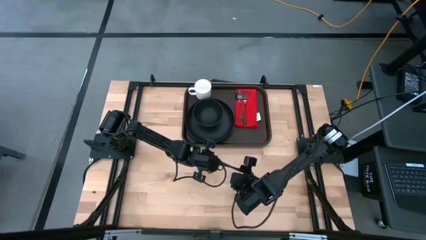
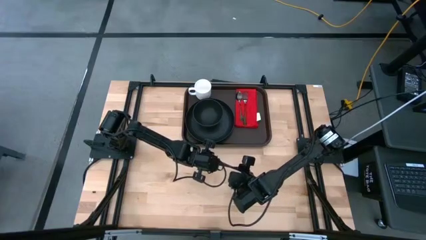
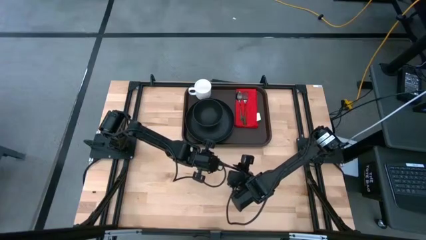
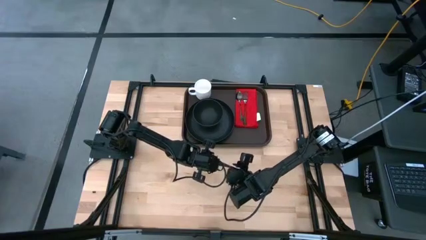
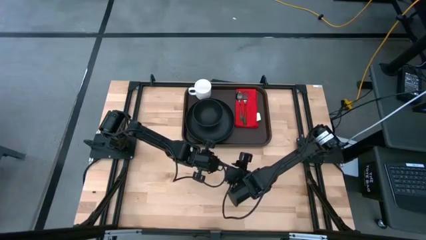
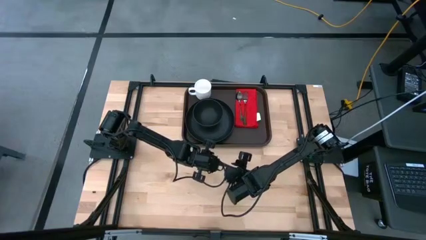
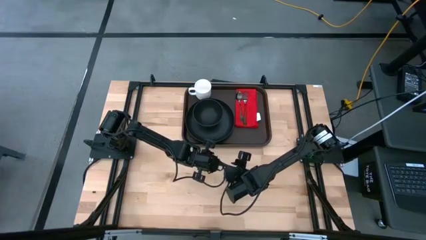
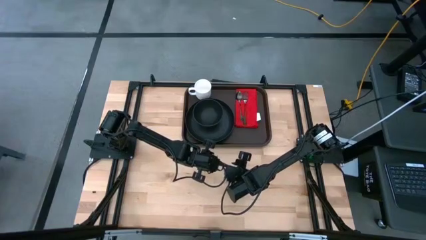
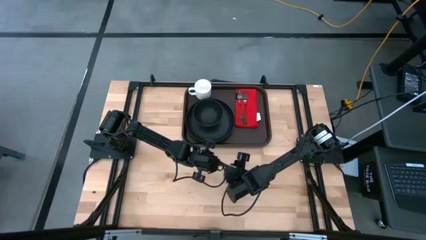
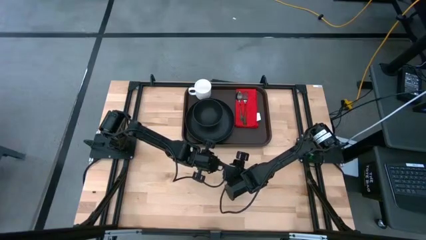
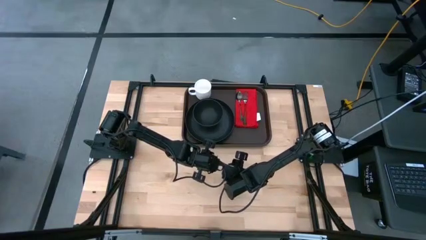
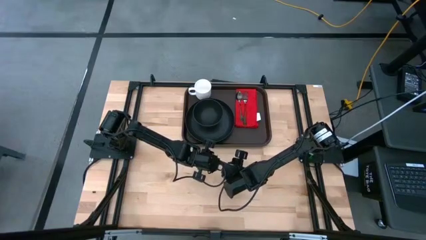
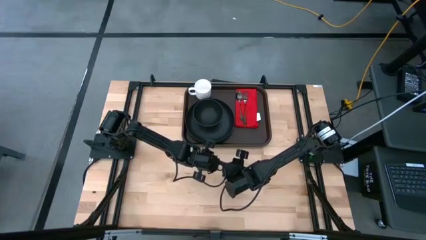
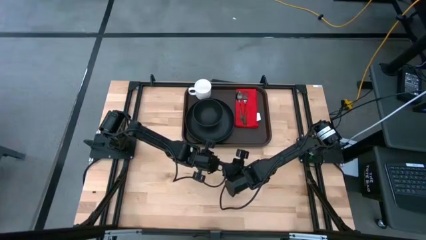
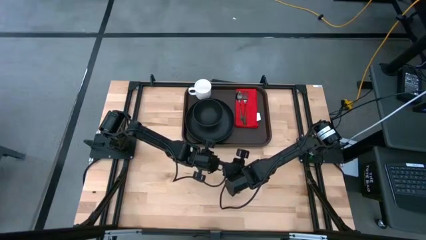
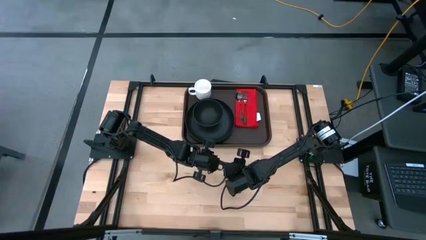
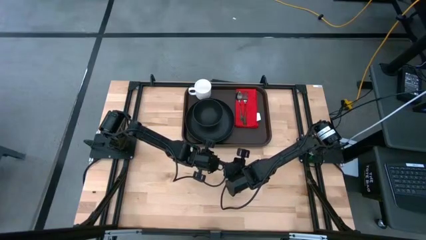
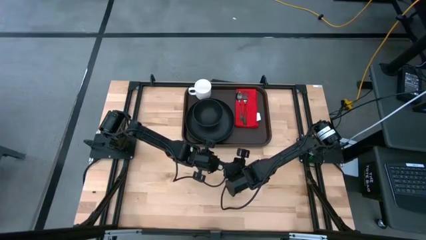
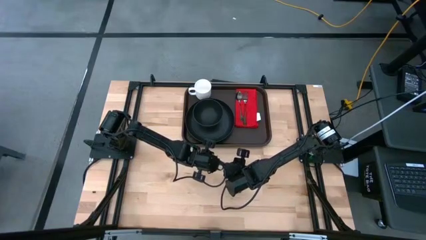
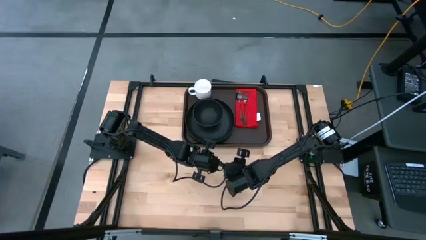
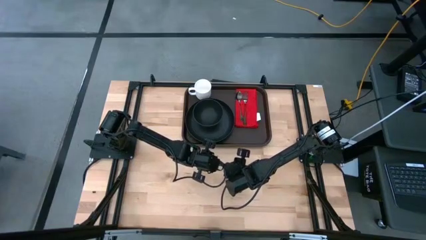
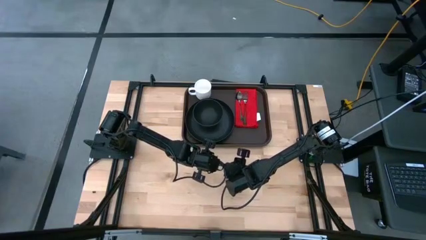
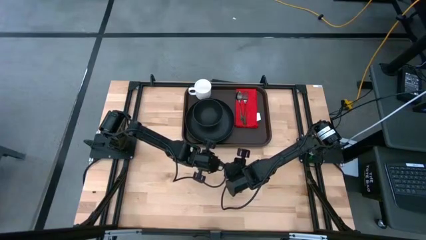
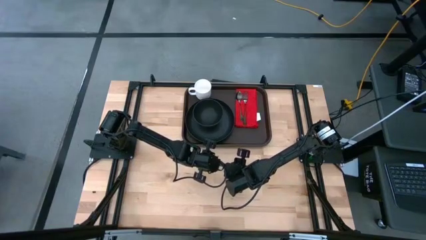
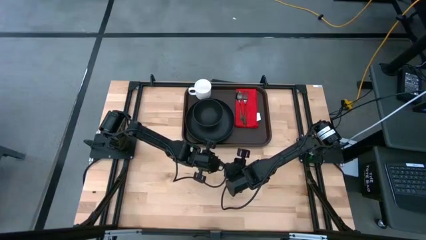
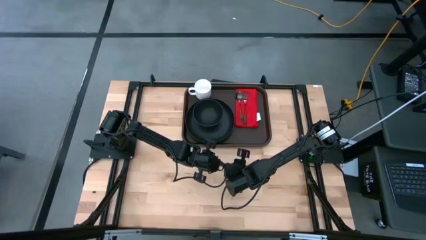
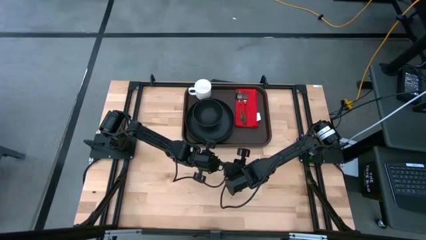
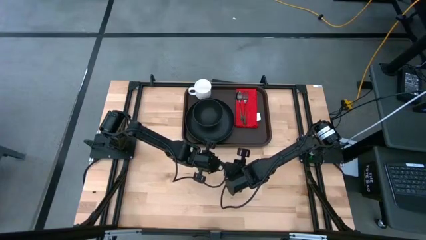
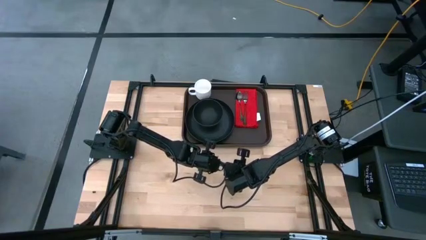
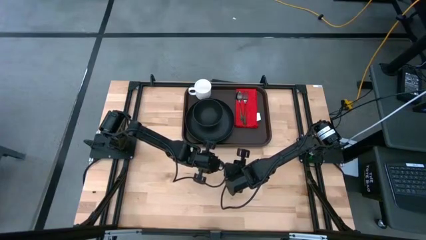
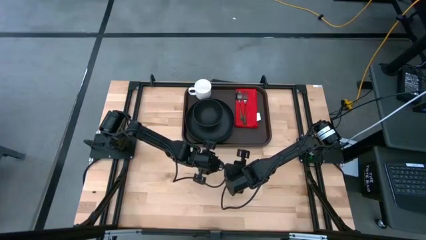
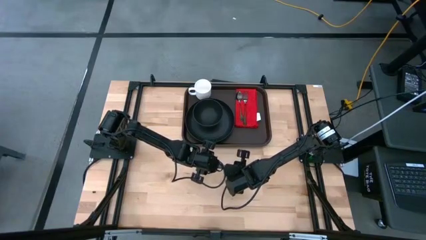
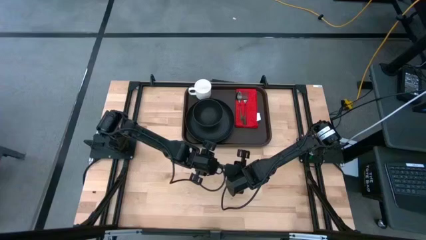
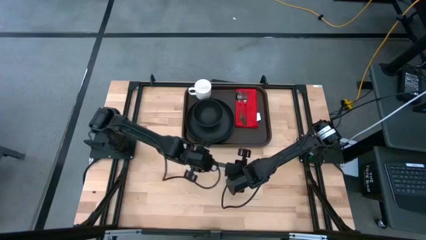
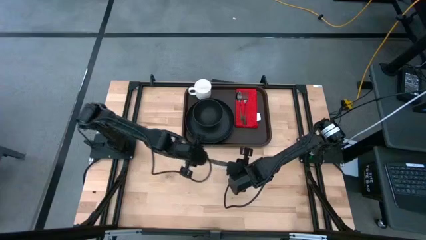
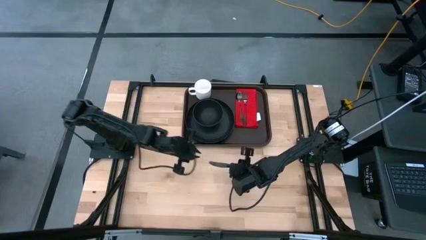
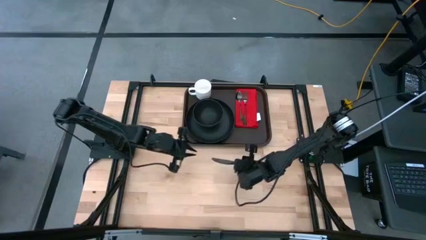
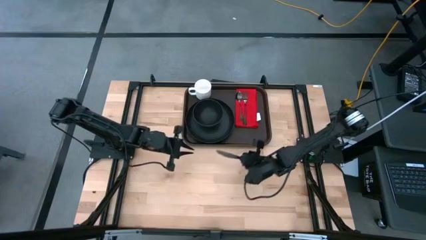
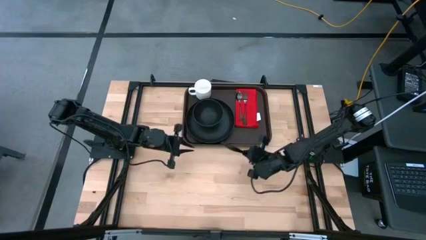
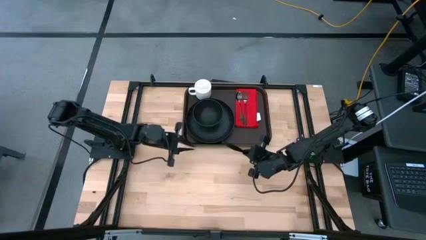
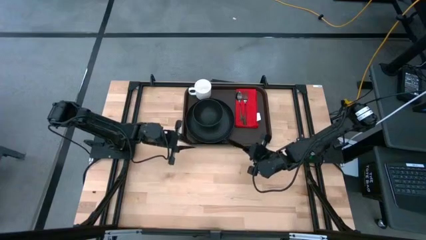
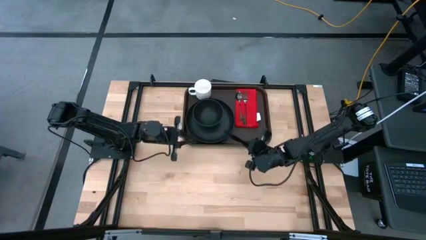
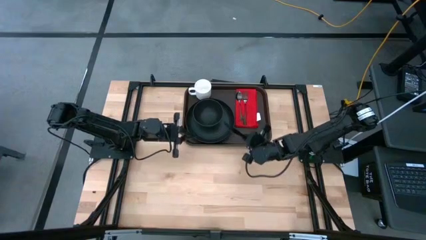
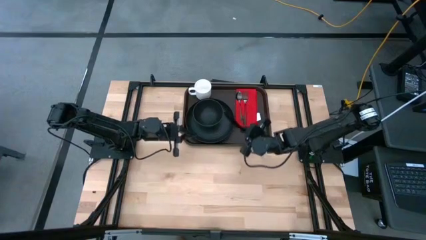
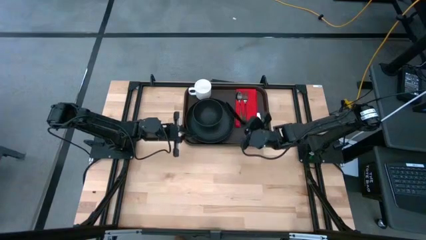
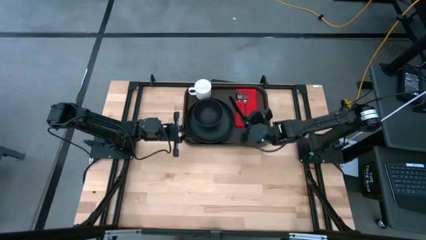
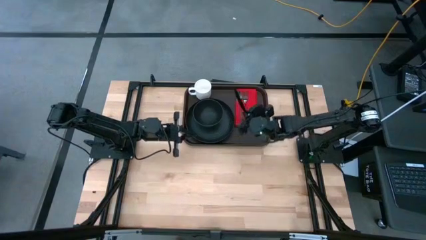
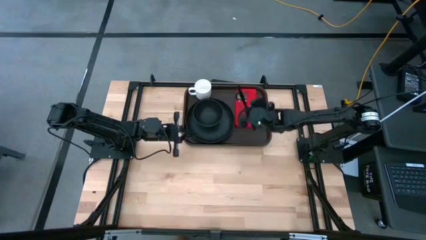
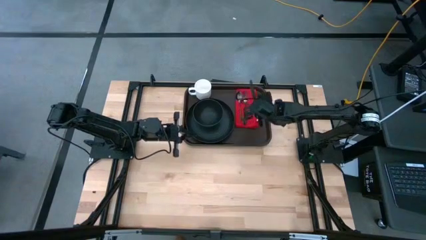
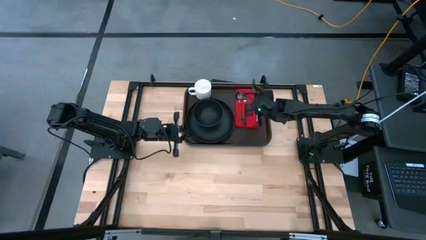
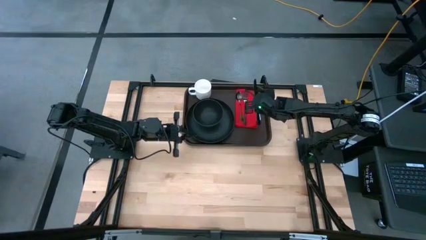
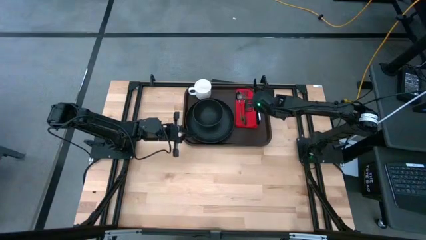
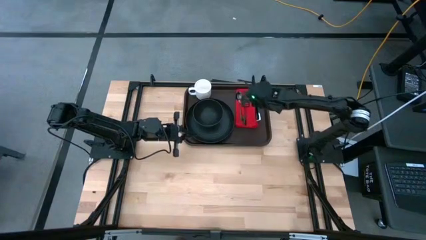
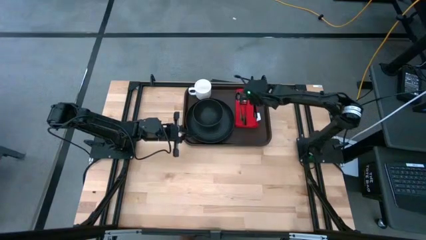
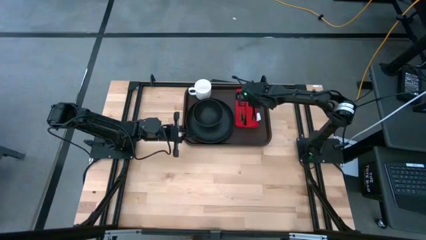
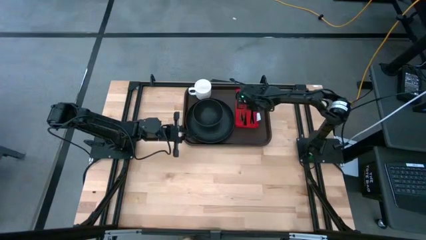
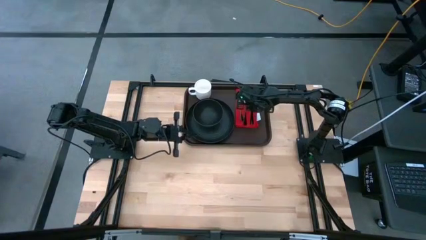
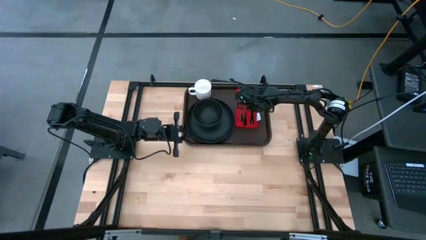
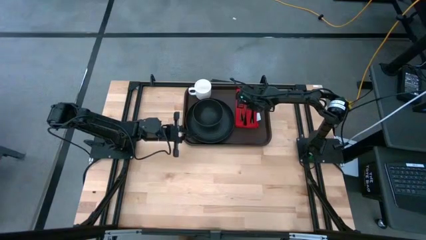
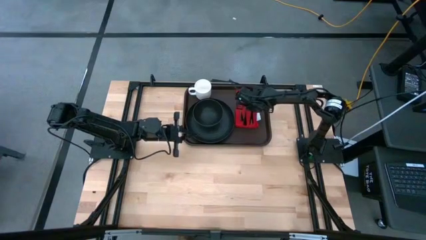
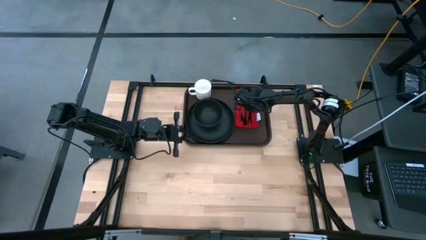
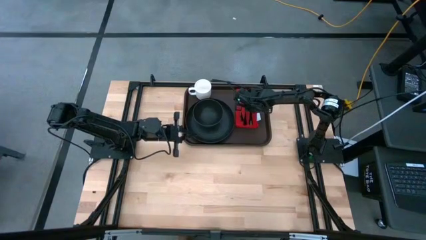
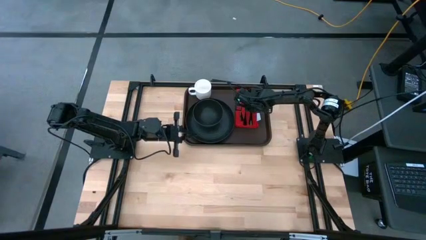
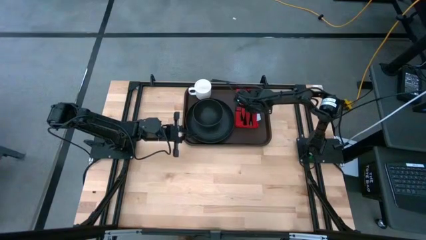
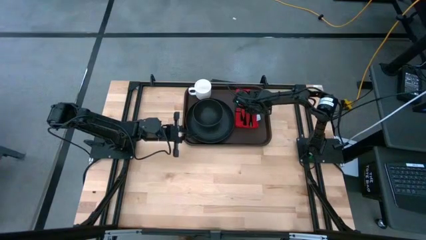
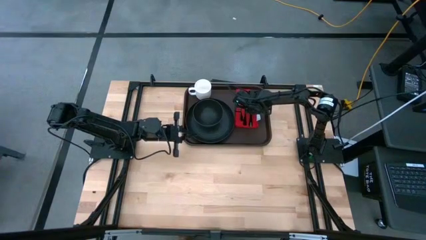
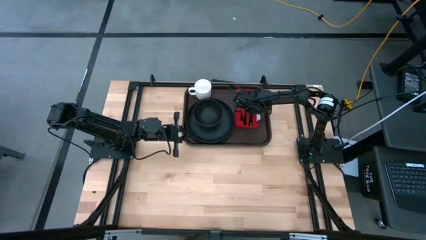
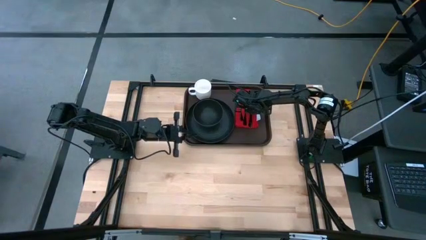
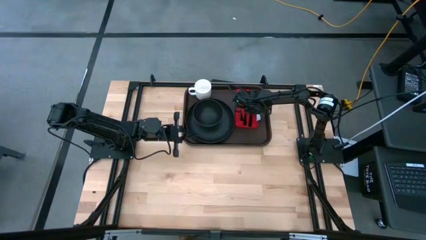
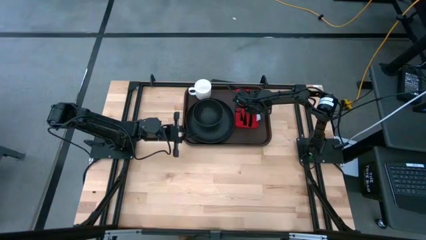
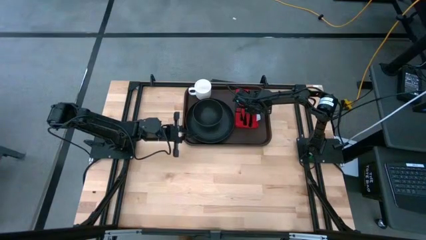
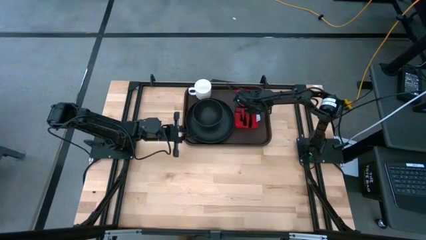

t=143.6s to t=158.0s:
Task: Set up tray
Put the black table knife on the red table napkin to the right of the black fork
